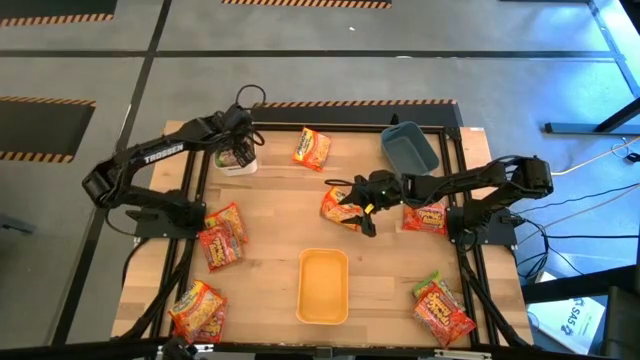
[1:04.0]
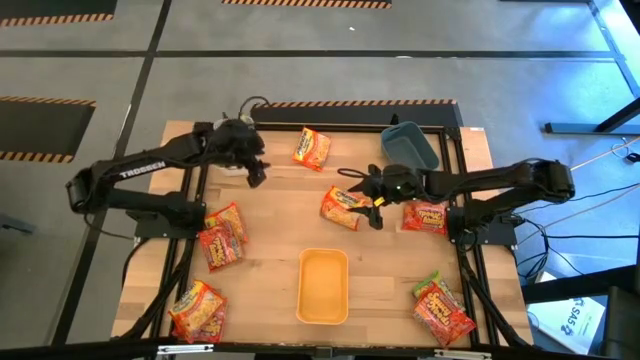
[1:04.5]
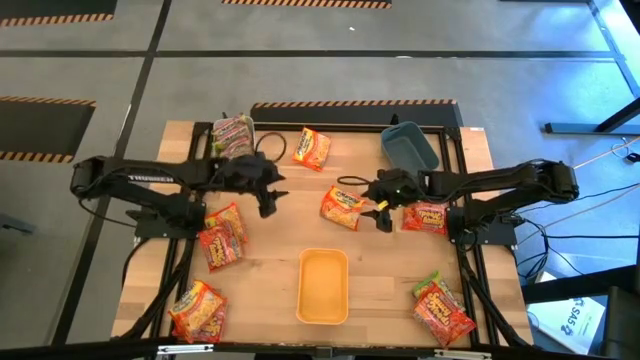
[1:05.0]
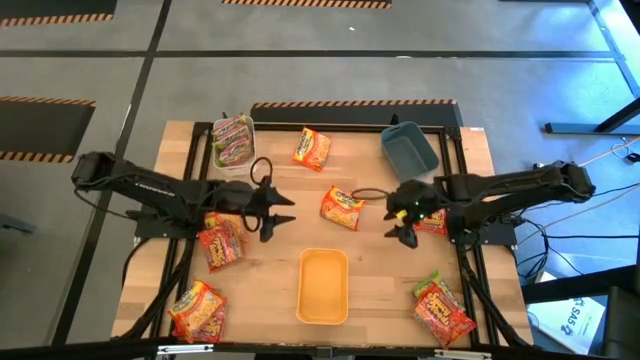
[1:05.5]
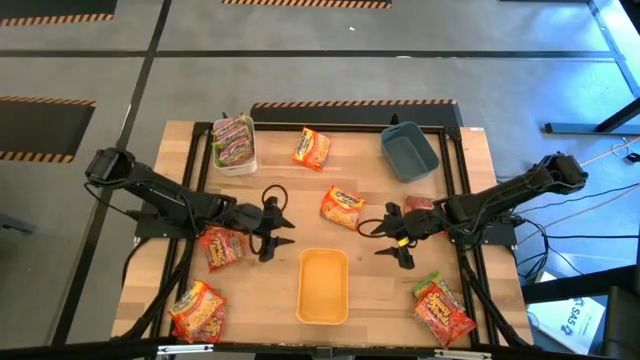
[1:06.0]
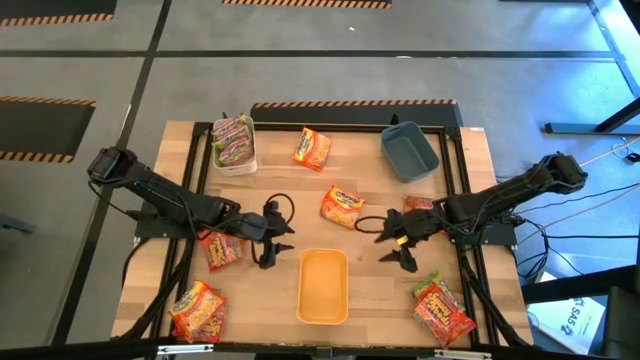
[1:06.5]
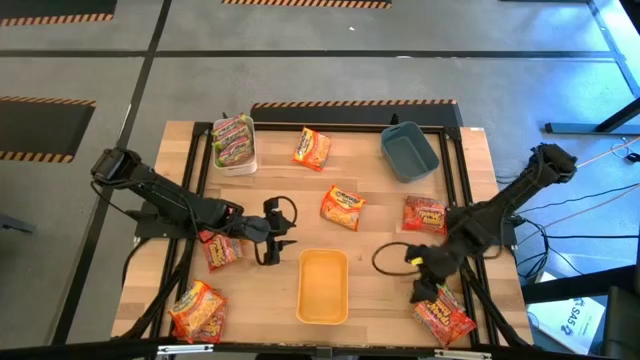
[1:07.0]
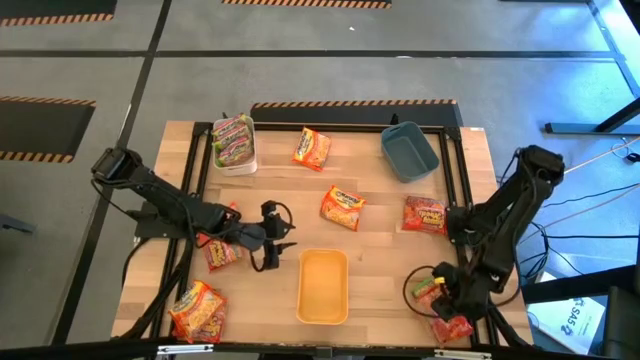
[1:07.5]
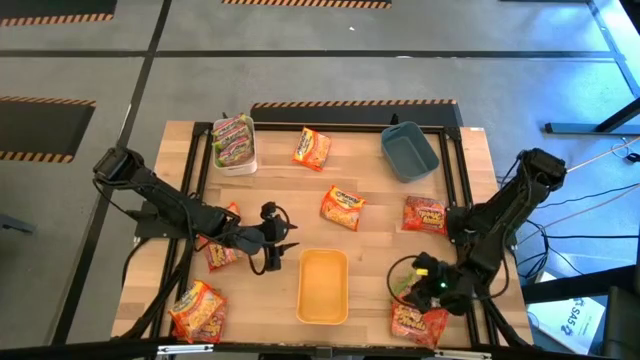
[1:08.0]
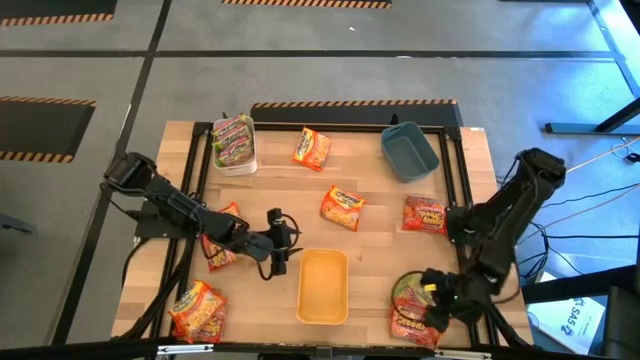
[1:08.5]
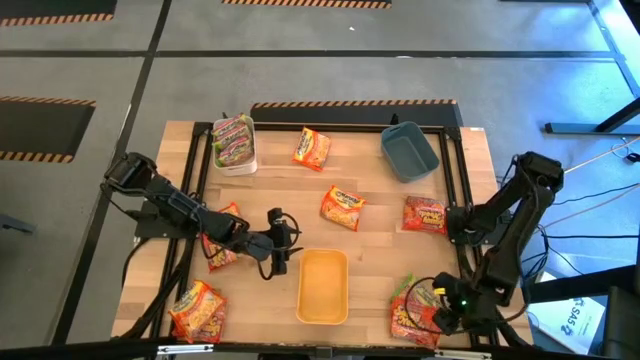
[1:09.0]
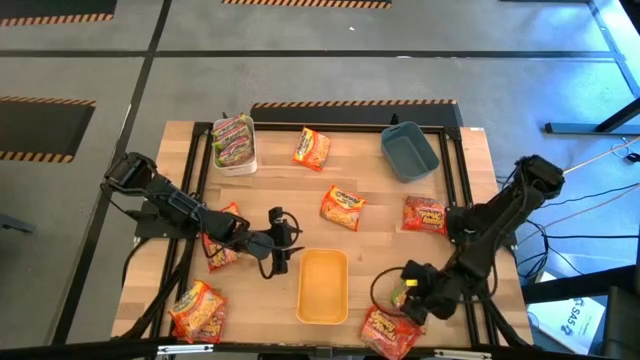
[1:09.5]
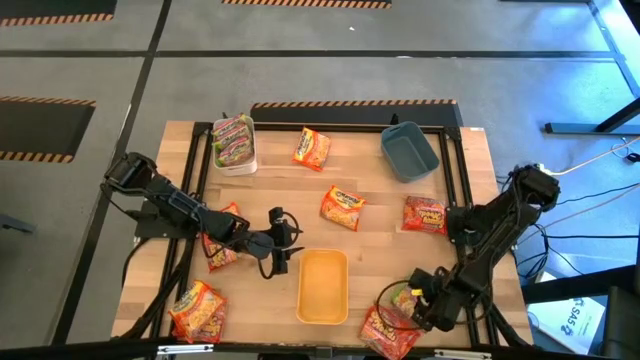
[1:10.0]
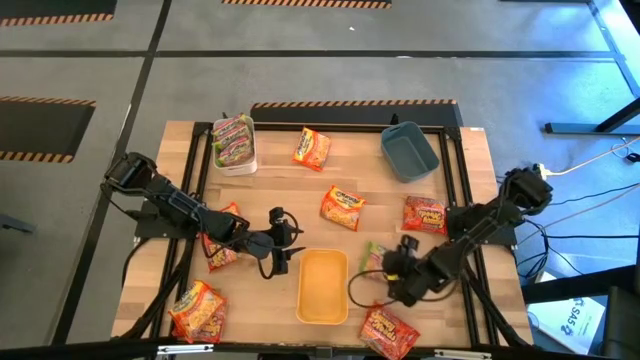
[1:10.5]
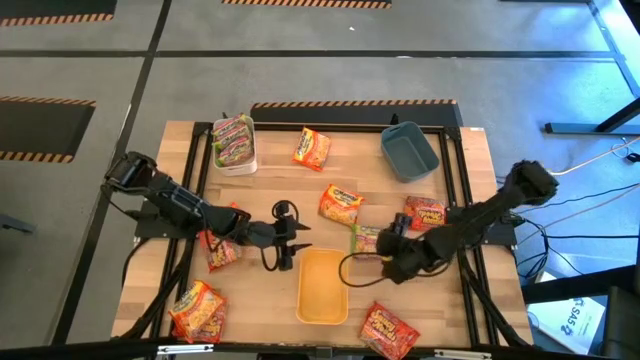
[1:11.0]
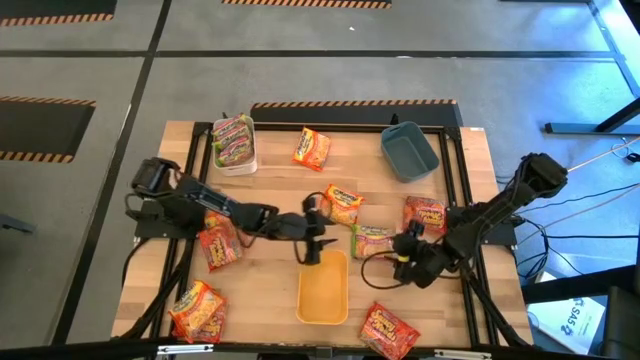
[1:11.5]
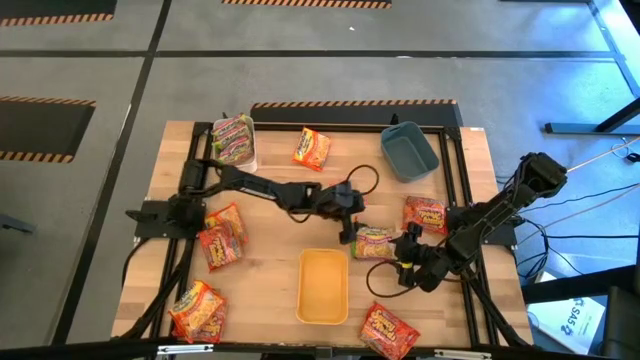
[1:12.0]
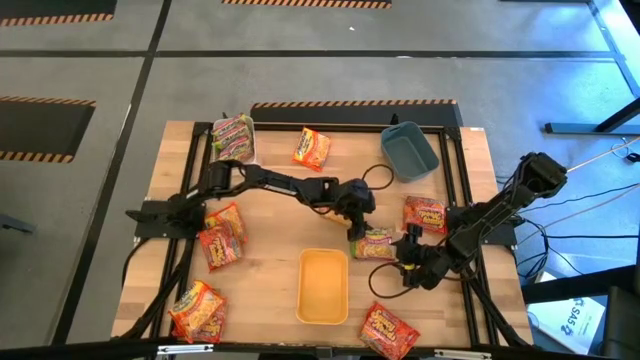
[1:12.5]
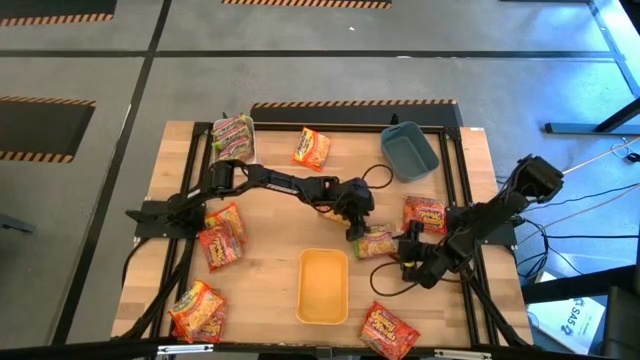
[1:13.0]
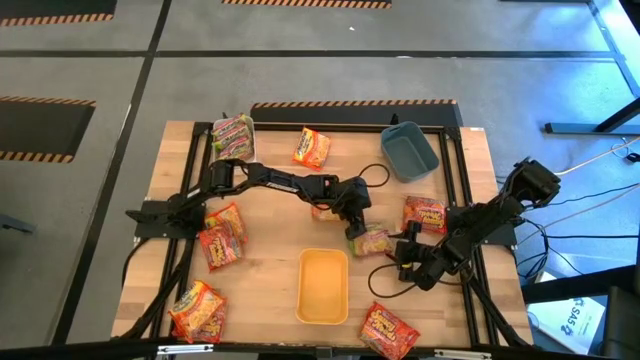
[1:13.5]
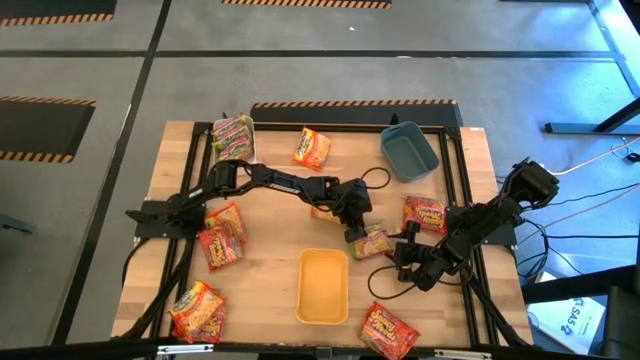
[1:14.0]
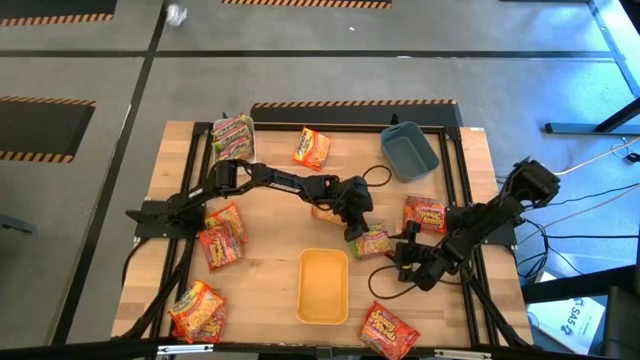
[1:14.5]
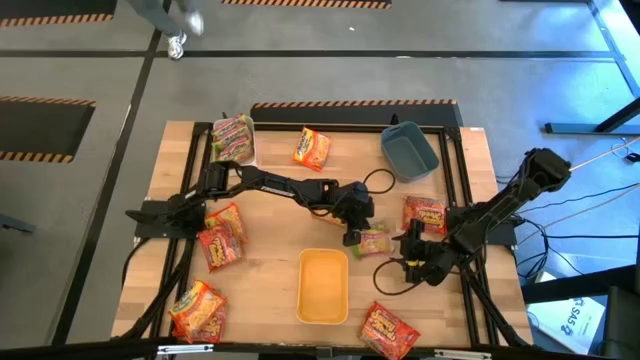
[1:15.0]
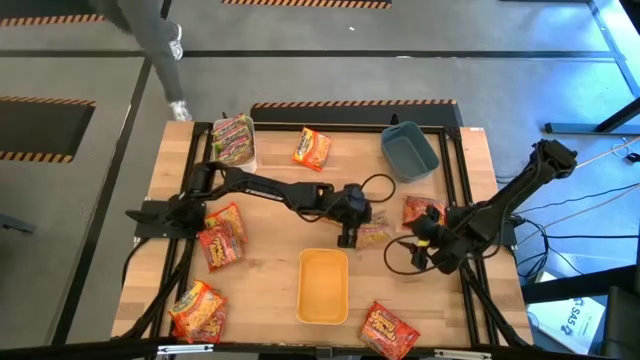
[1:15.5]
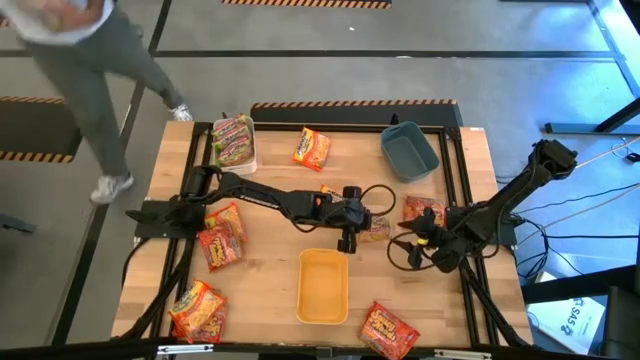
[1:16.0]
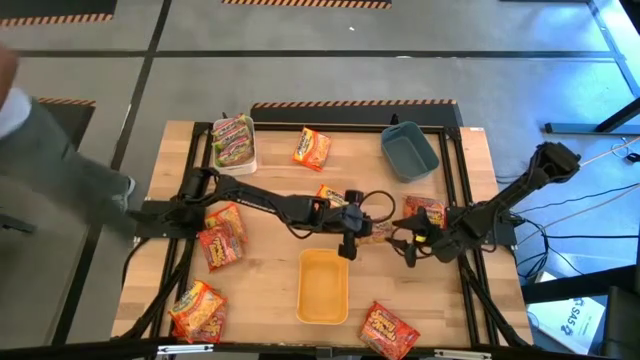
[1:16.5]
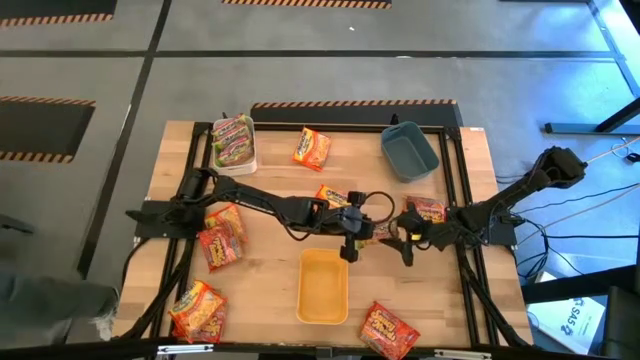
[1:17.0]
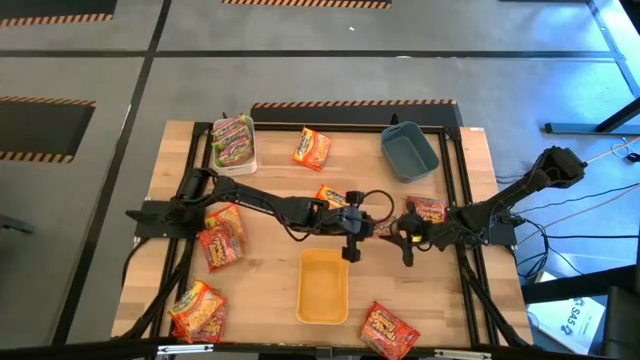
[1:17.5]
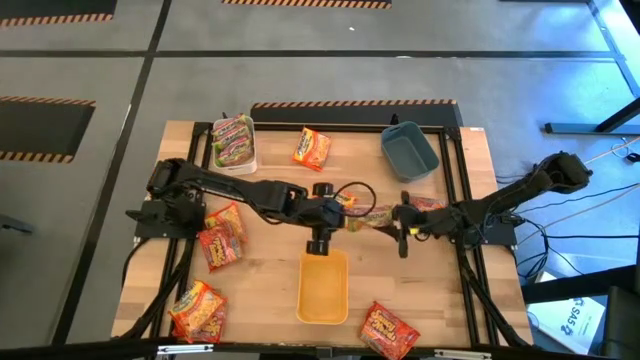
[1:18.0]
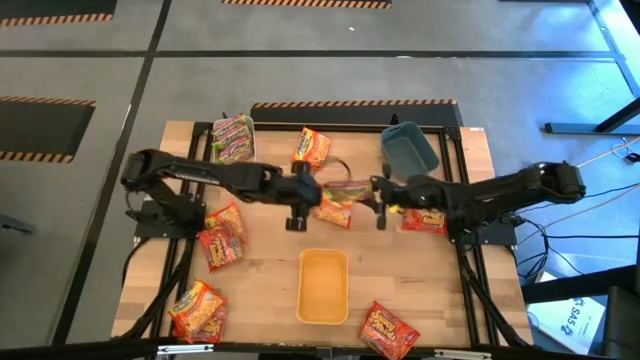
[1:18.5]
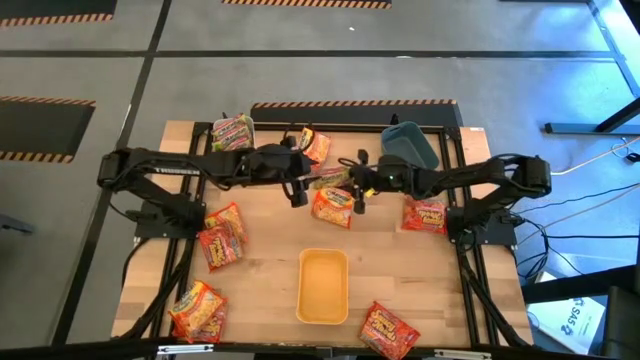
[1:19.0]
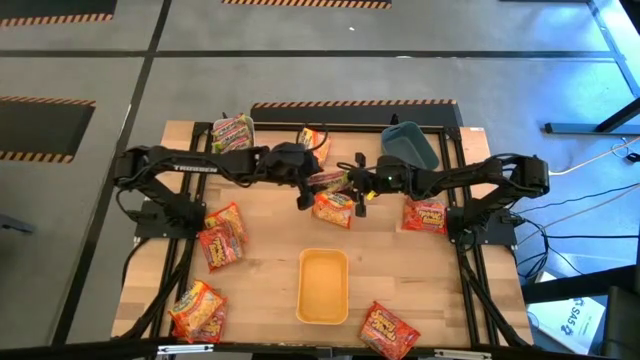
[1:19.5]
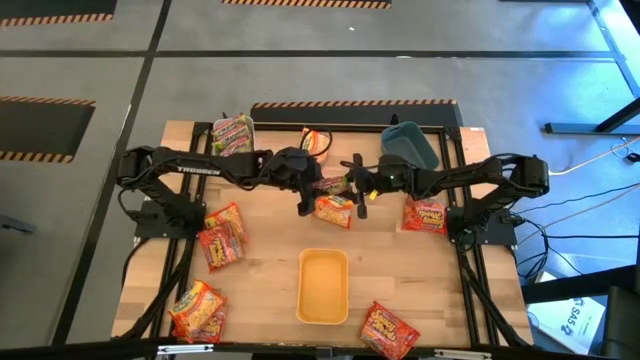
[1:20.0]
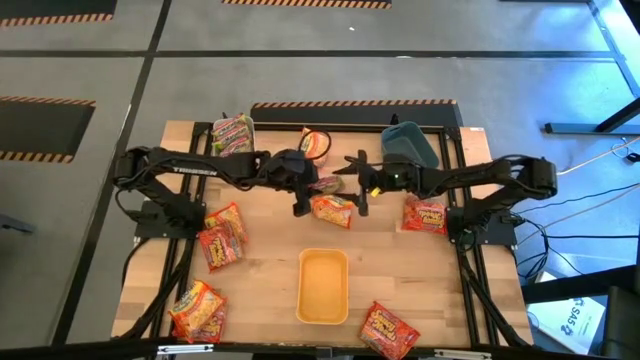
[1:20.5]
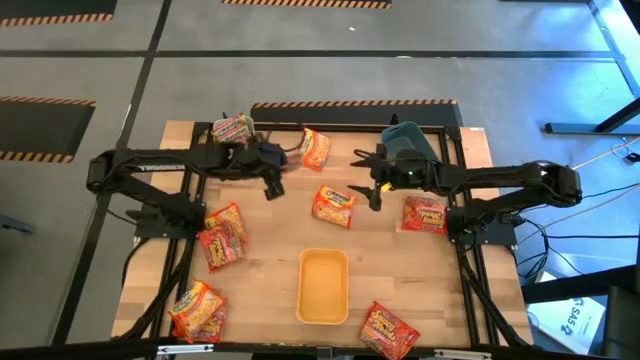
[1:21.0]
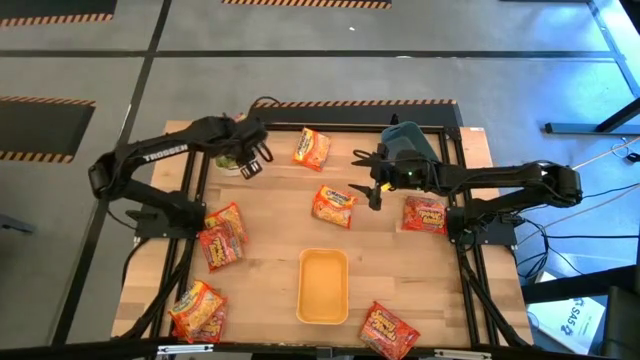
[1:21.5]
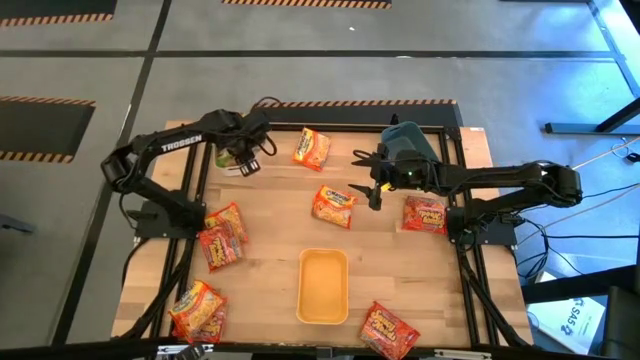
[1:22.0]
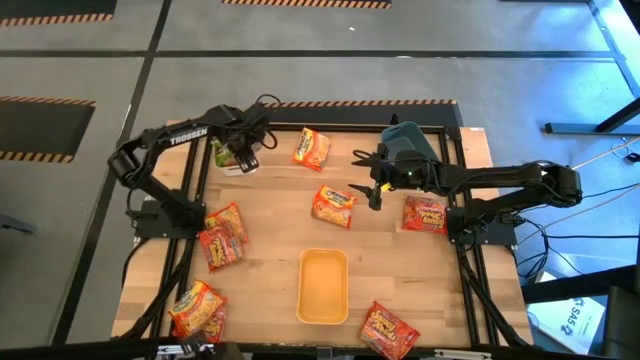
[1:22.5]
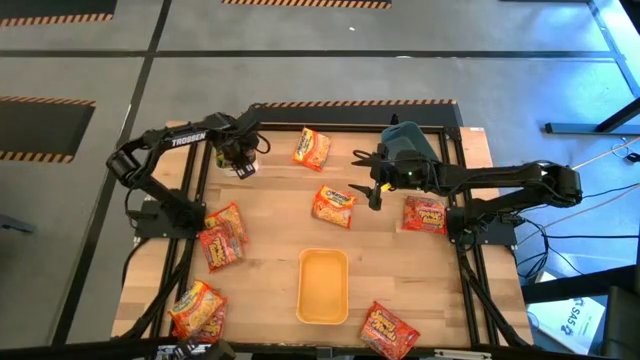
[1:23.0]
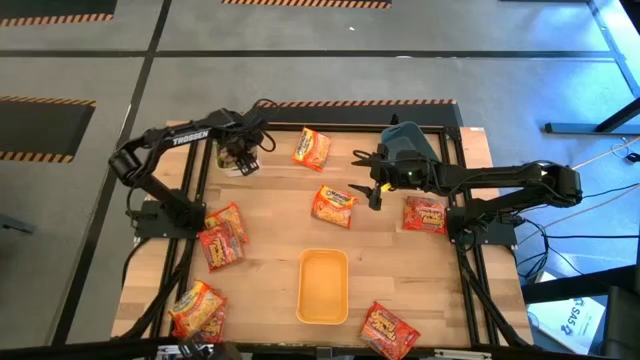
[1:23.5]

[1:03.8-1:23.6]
Task: Sort Maruchan noodles
Put the green noodle pack into the white bin

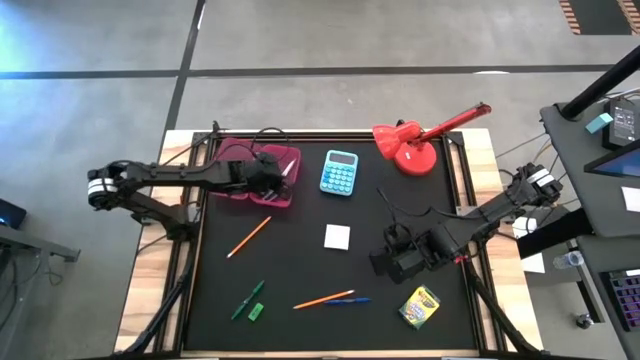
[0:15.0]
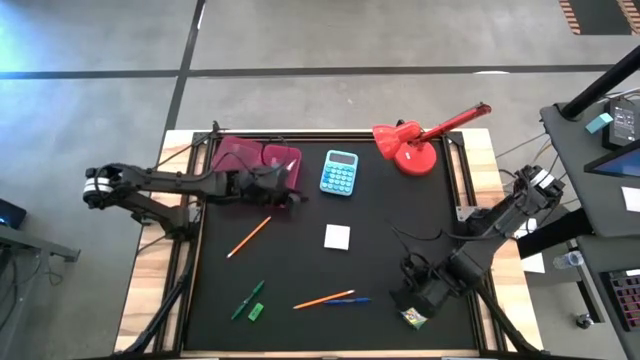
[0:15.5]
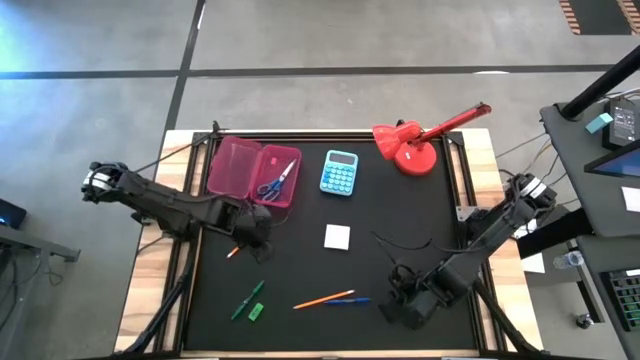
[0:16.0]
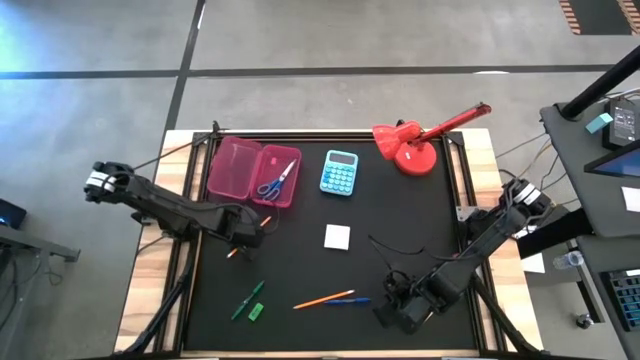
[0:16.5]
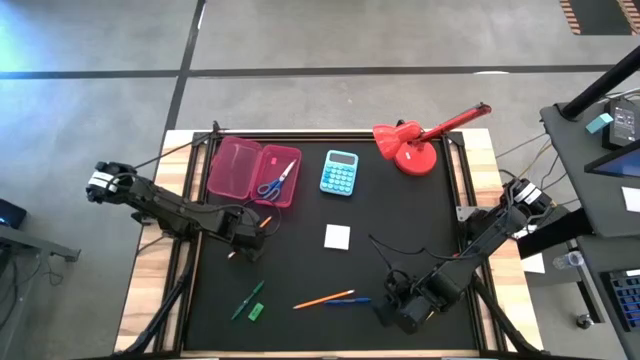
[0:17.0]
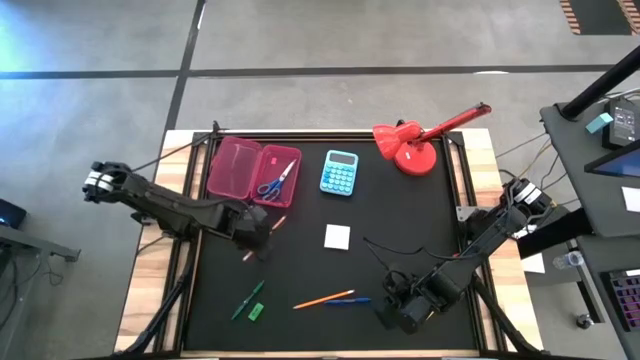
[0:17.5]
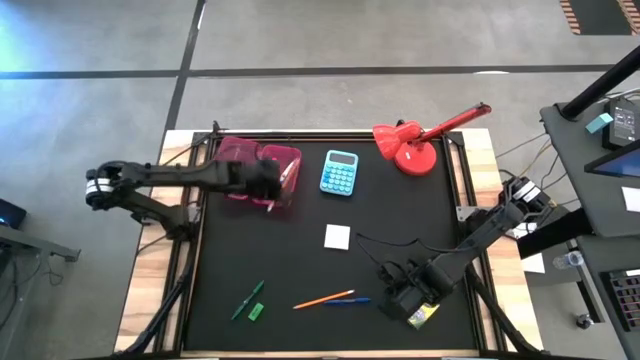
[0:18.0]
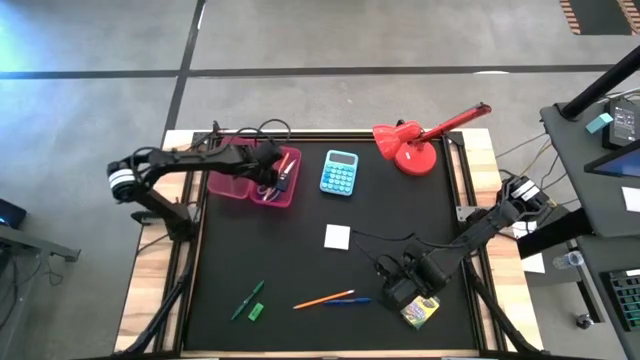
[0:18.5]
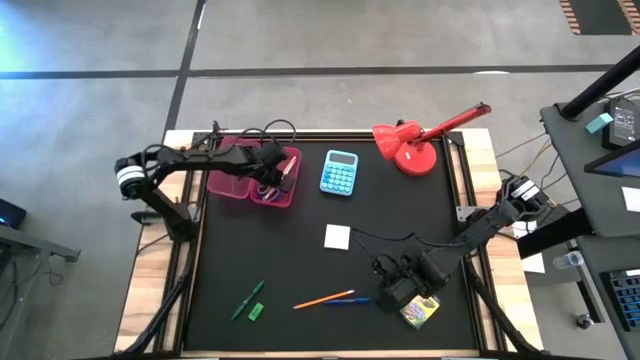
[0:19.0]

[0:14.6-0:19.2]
Task: Pack school essentials
Put the top orange pencil into the pink supply box
